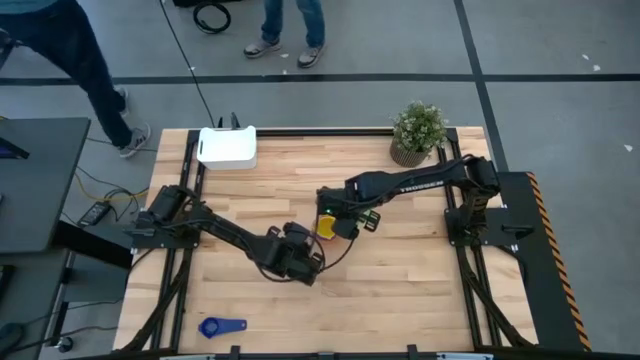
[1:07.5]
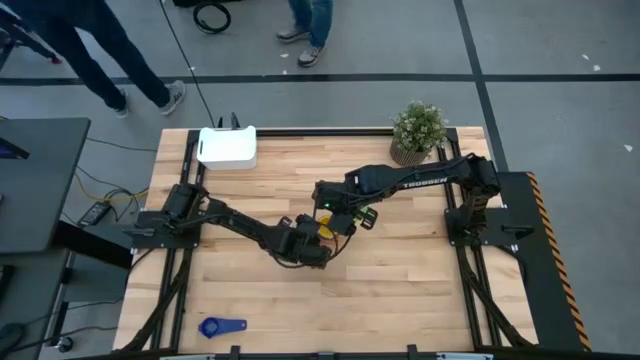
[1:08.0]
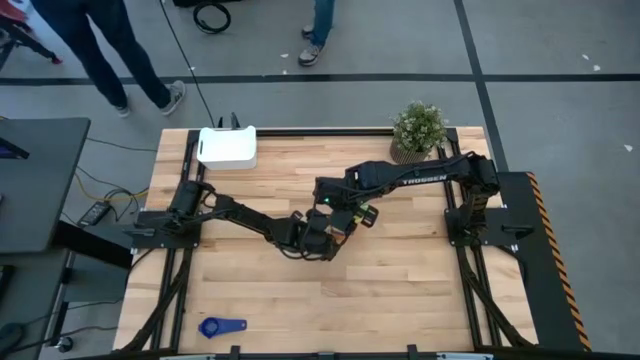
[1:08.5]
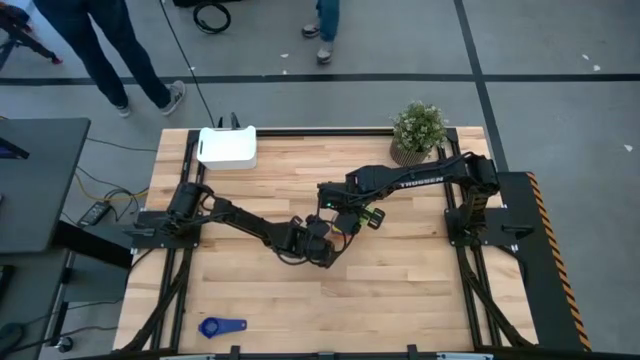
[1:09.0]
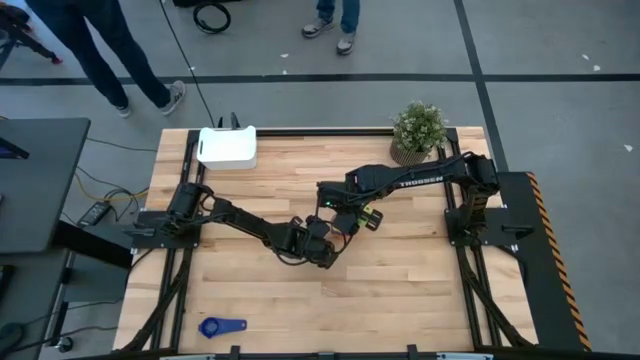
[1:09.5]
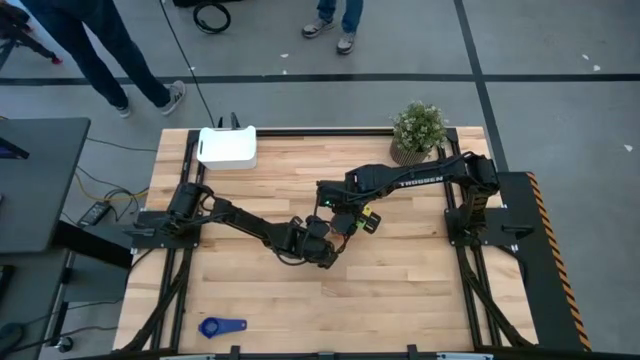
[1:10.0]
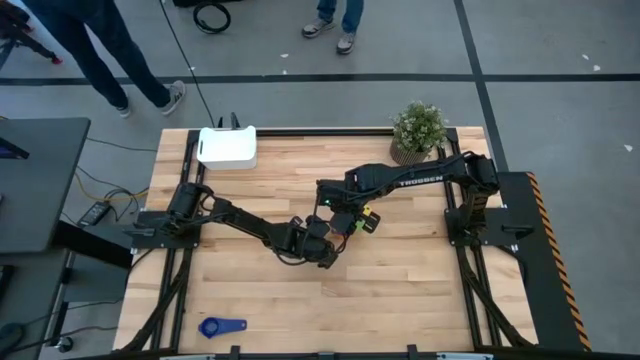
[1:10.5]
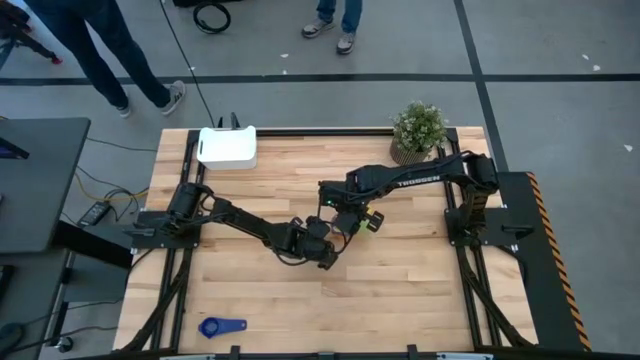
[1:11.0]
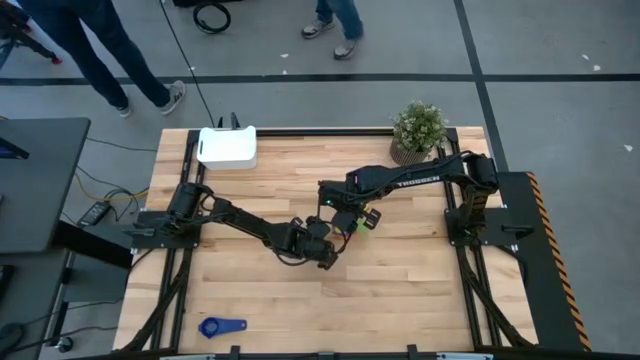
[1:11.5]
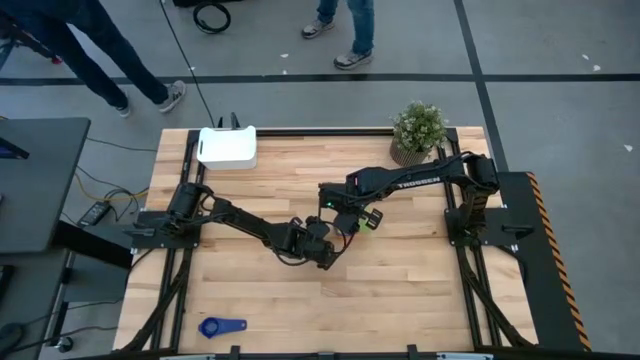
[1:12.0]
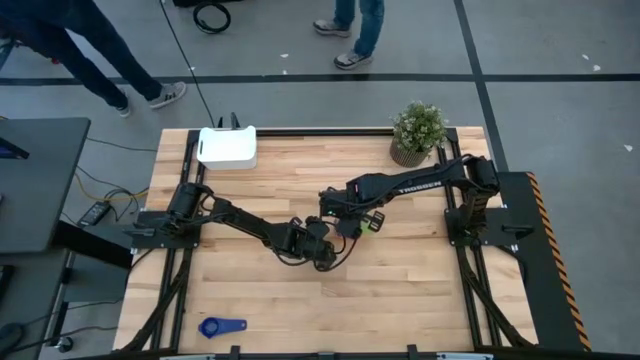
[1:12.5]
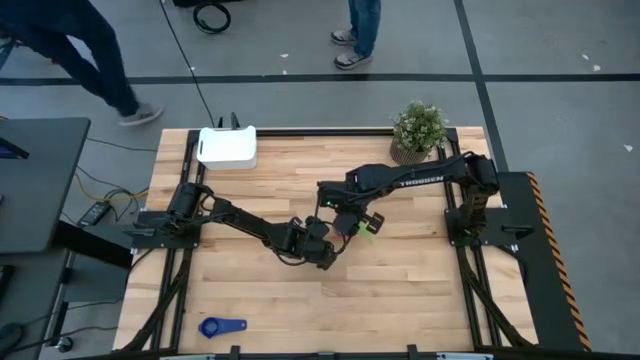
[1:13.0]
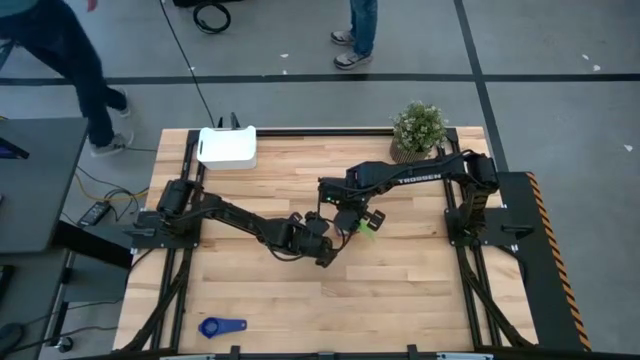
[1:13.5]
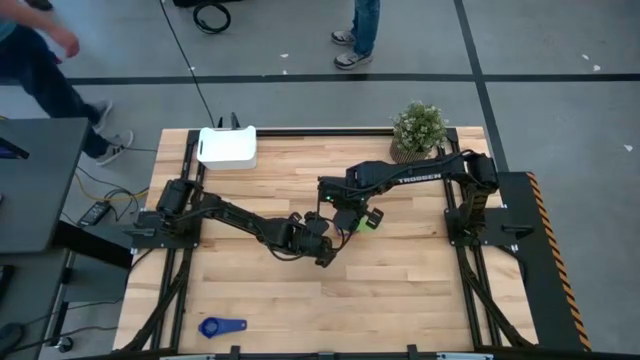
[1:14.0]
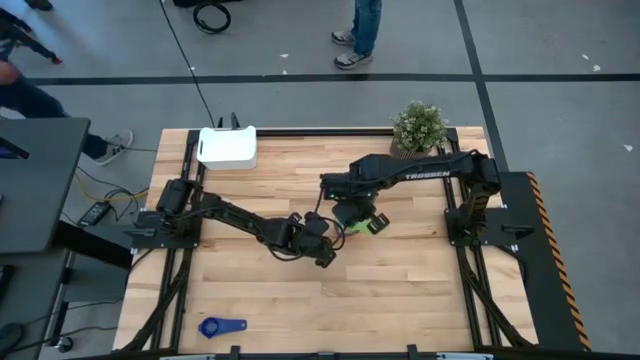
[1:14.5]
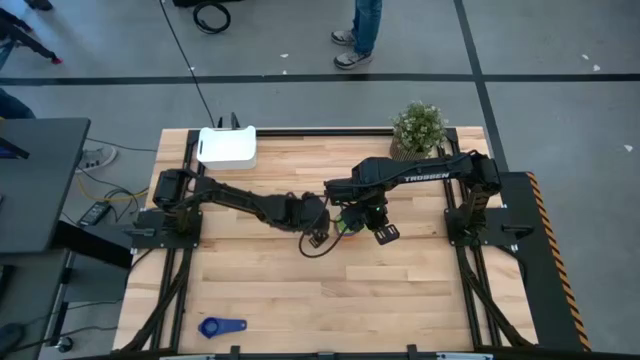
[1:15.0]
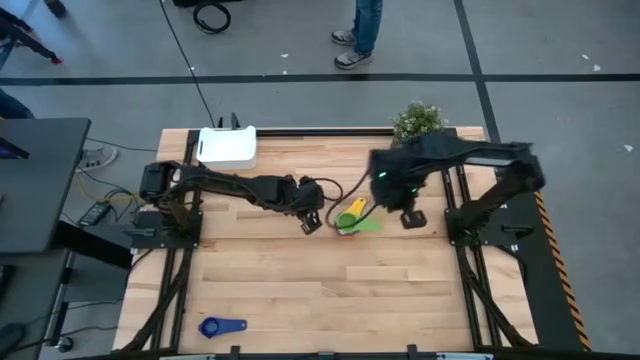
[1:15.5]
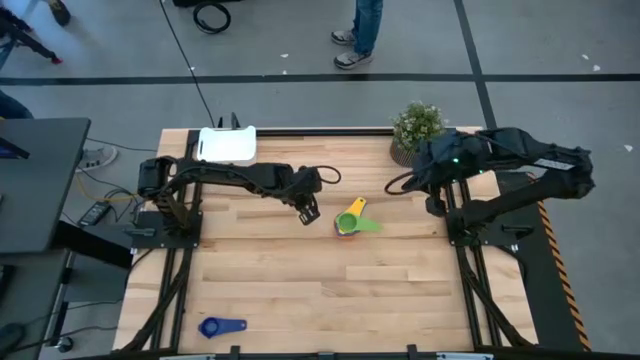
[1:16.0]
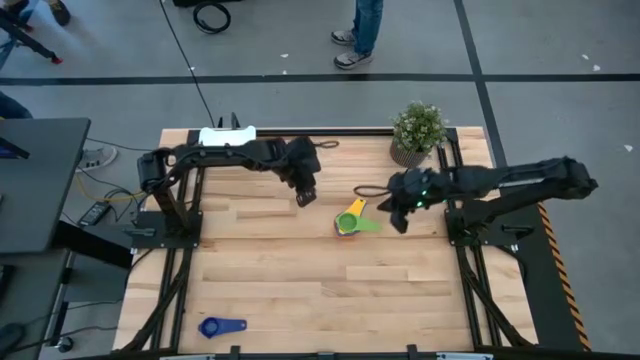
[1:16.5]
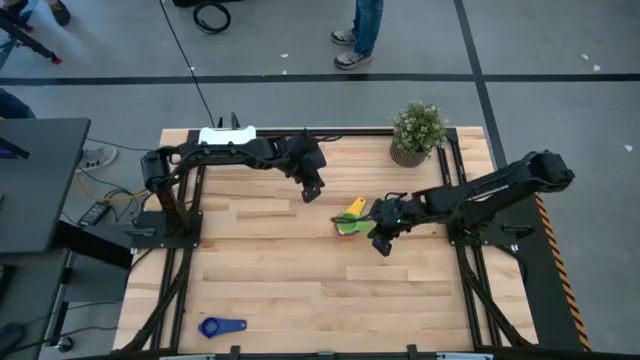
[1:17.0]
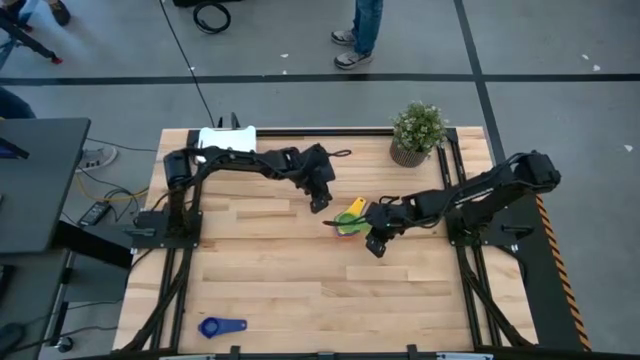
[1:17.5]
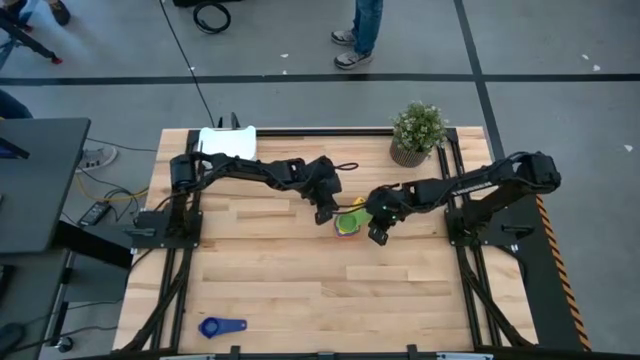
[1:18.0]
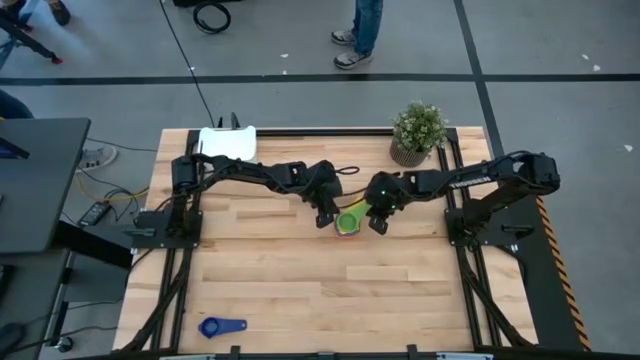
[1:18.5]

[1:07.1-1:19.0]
Task: Nest measuring cups in basket
Stack the green measuring cup on top of the yellow measuring cup

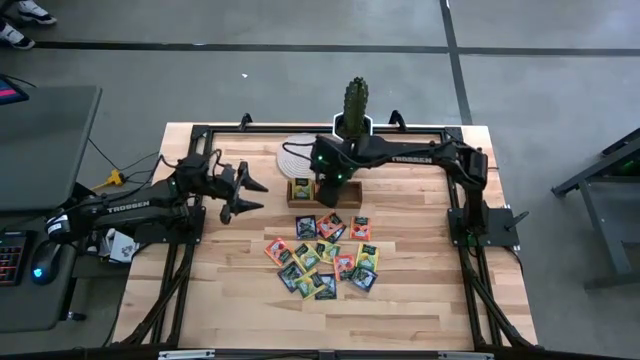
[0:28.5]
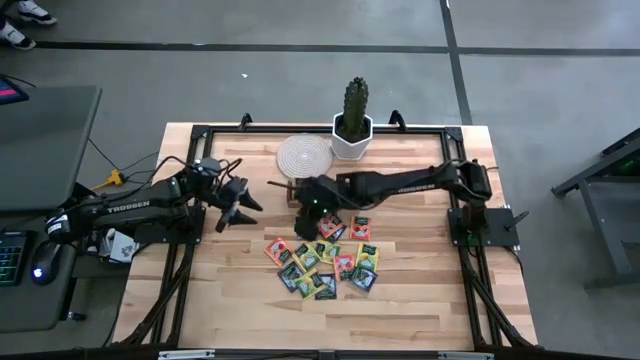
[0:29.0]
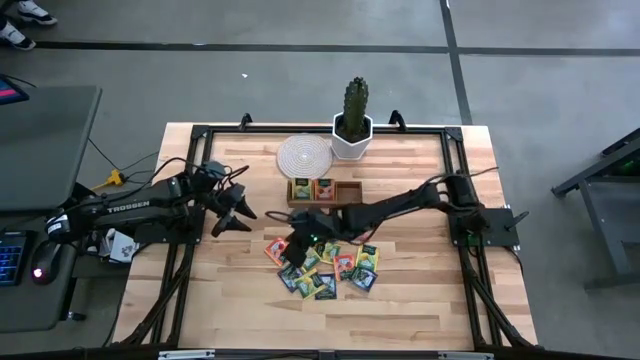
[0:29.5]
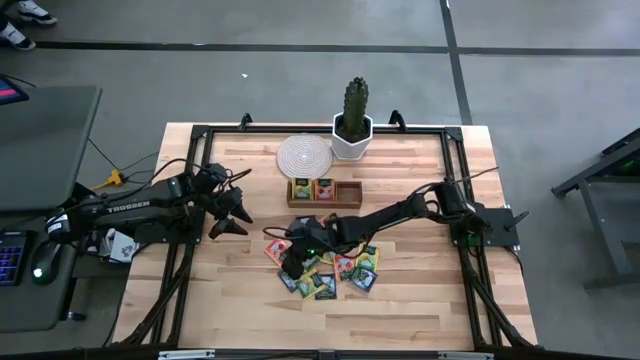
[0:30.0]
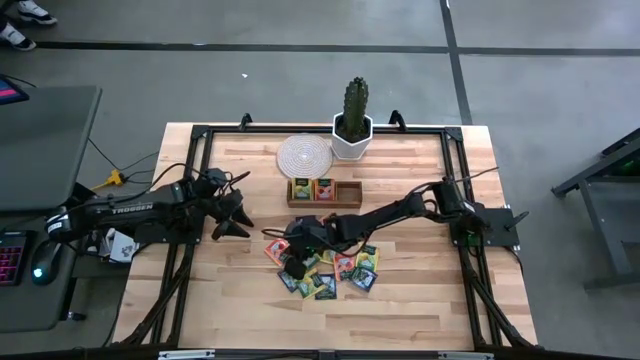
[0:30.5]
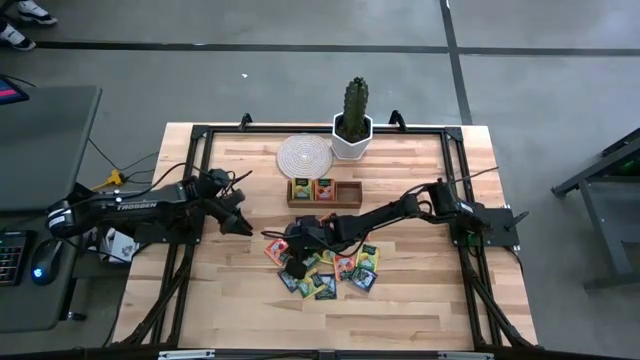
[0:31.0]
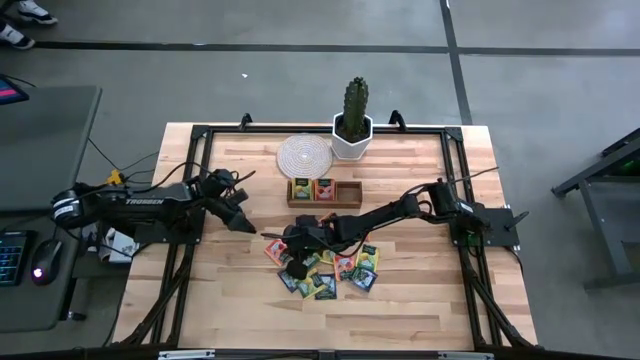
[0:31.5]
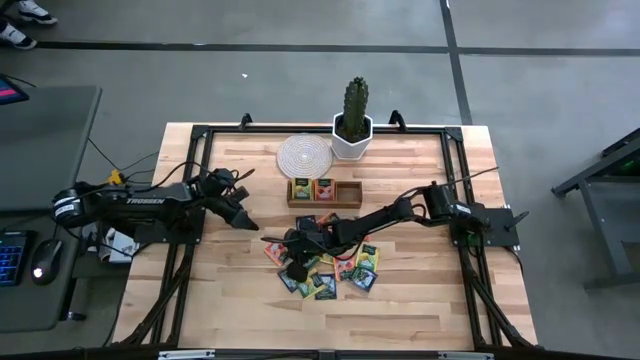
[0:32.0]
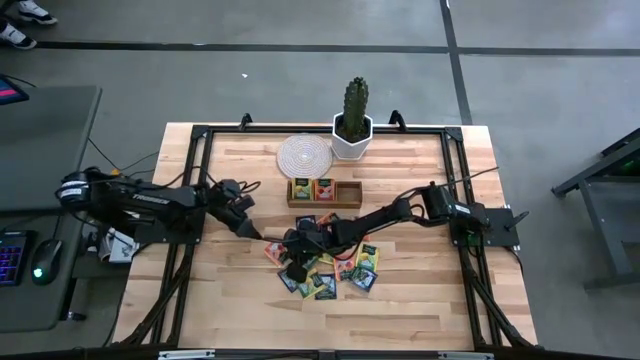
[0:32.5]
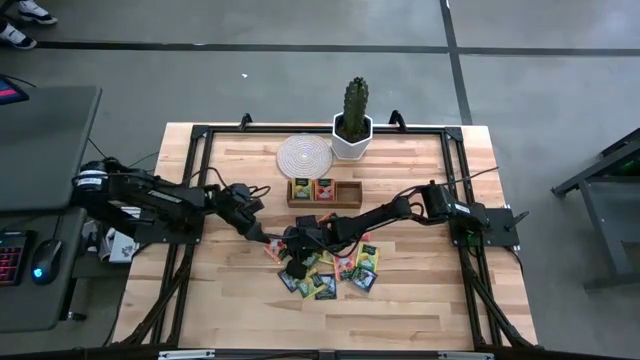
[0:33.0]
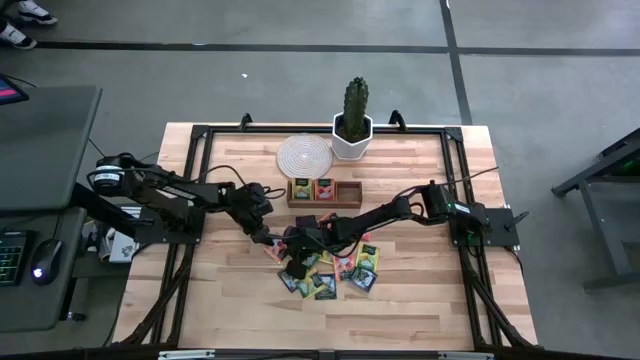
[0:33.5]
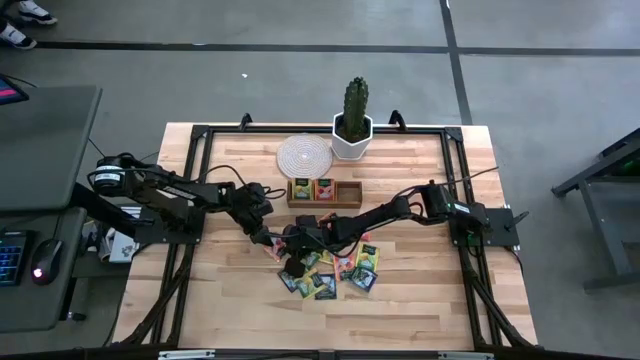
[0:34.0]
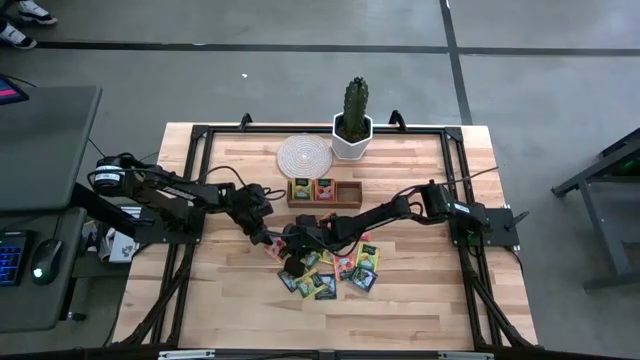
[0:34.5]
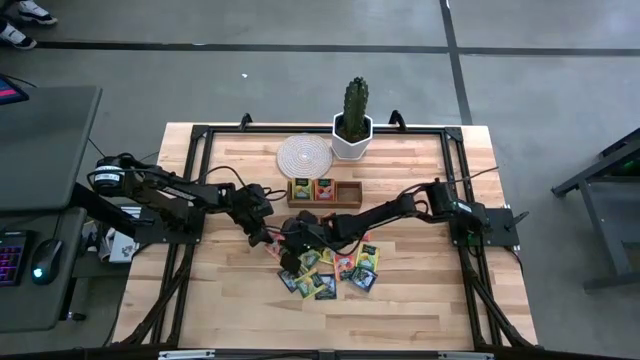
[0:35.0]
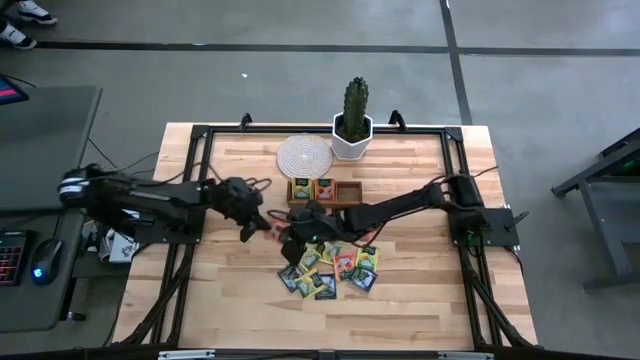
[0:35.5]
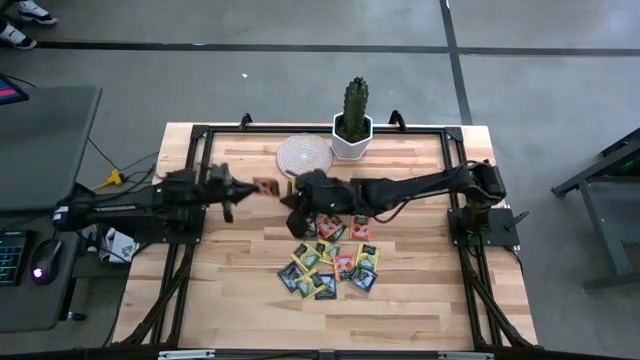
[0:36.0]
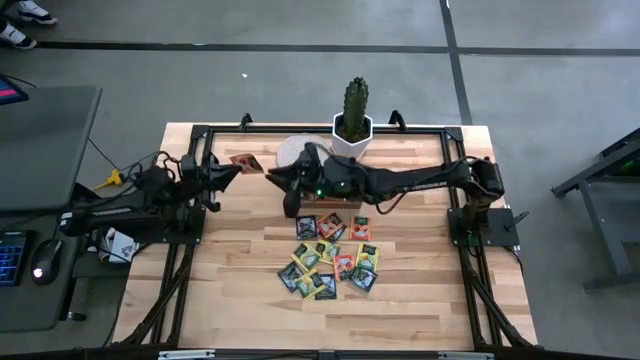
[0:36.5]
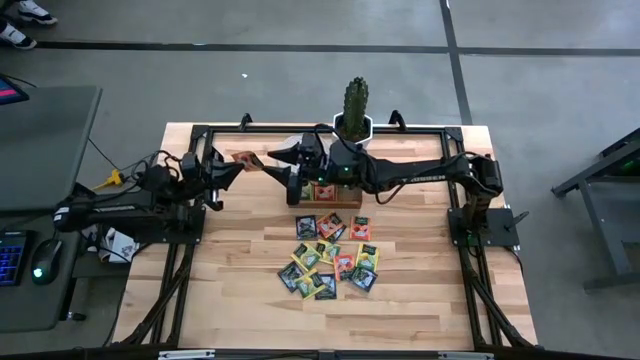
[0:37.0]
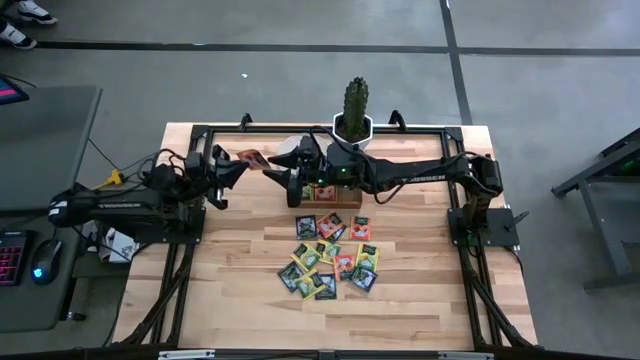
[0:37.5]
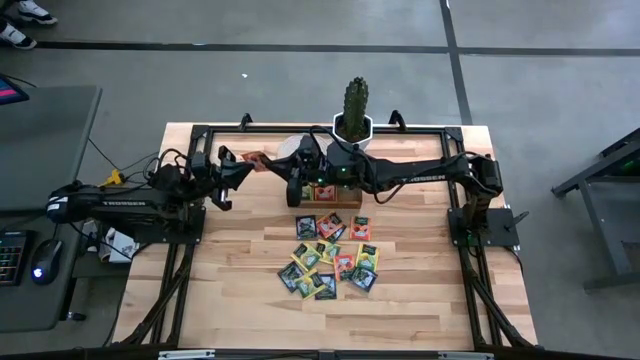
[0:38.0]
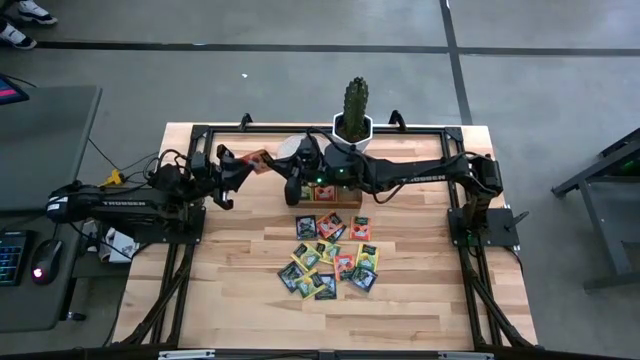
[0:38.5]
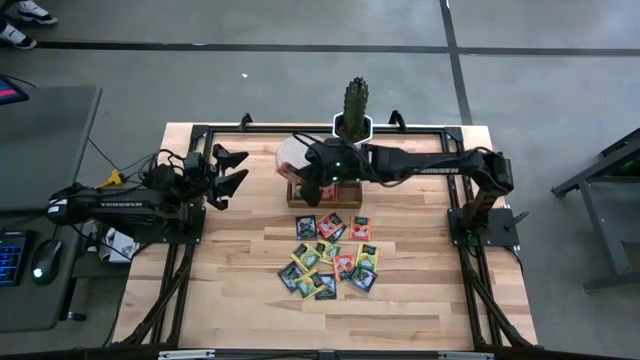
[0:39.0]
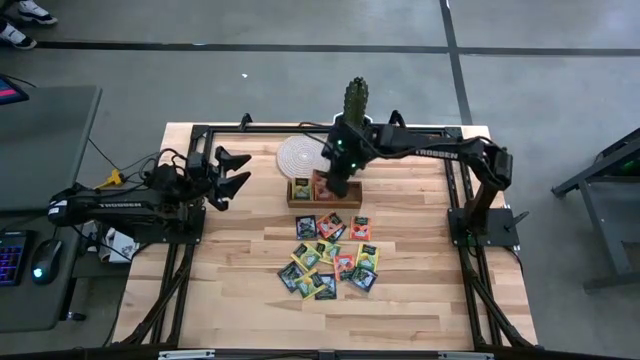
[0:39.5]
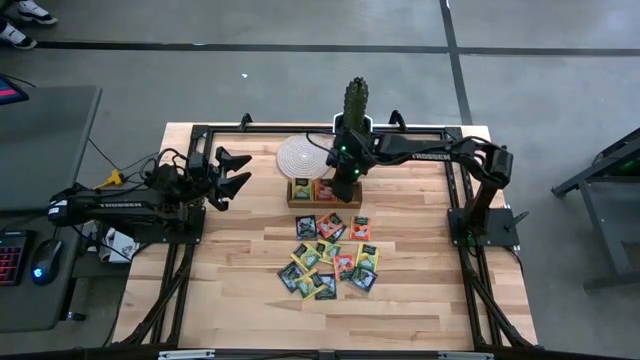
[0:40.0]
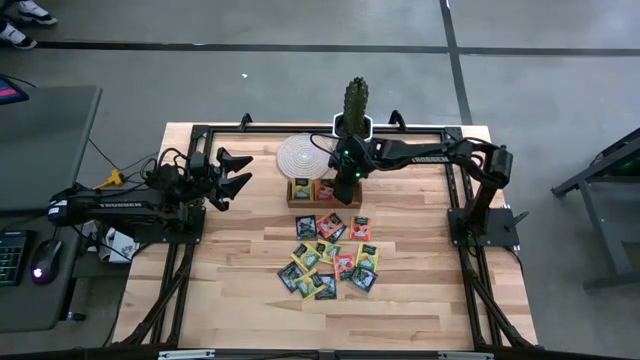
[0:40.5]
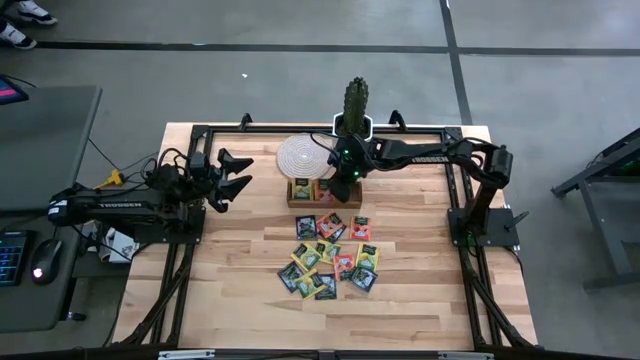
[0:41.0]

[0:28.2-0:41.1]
Task: Pick & Place Tea
Put the orange tea bag into the middle section of the wooden organizer
